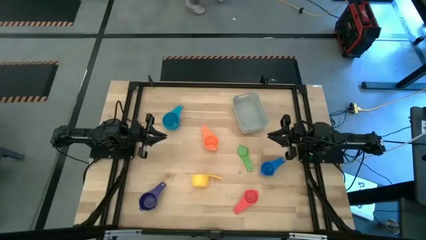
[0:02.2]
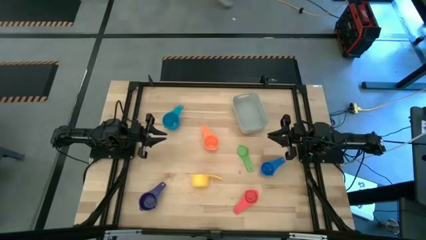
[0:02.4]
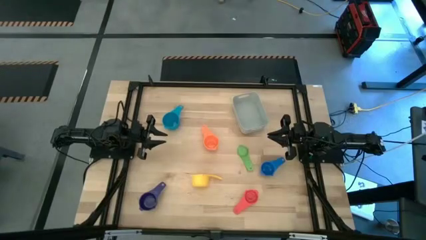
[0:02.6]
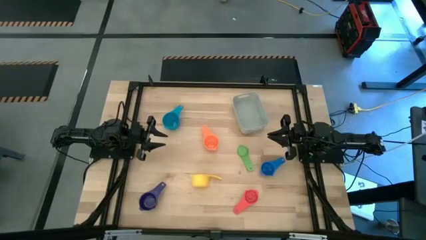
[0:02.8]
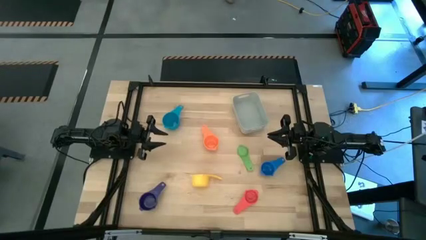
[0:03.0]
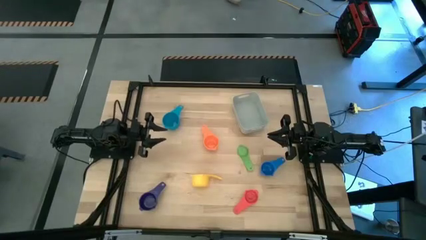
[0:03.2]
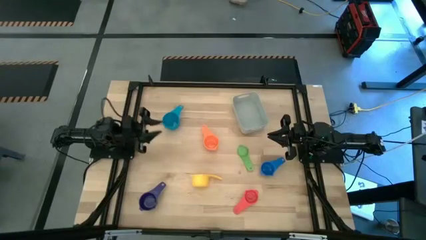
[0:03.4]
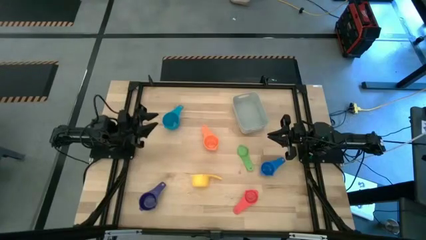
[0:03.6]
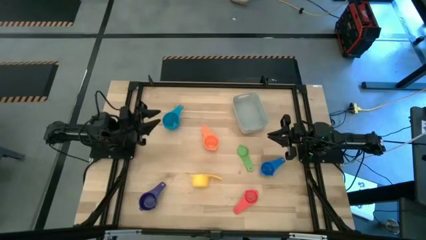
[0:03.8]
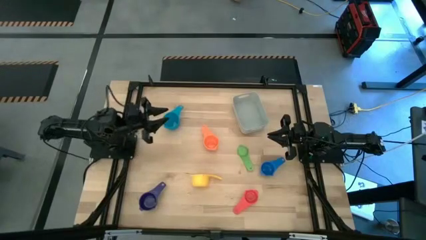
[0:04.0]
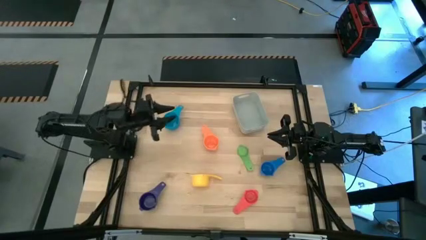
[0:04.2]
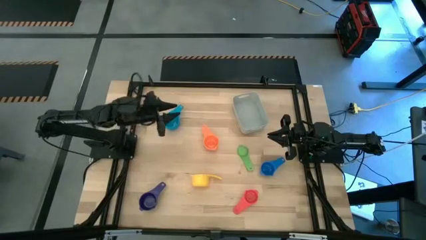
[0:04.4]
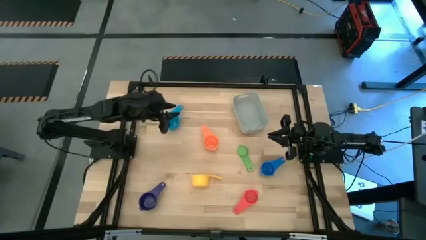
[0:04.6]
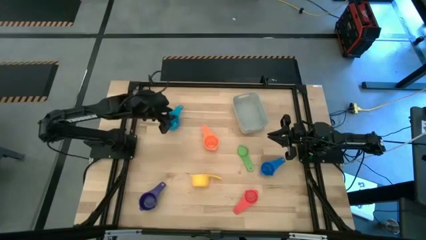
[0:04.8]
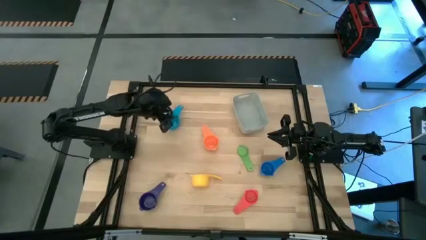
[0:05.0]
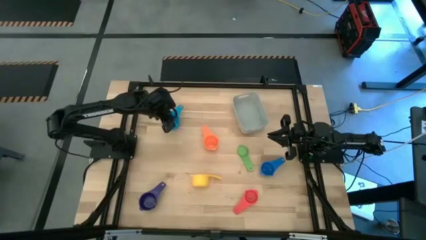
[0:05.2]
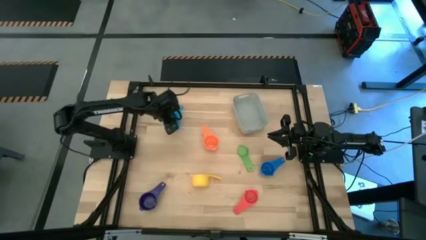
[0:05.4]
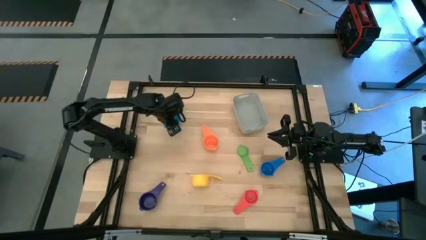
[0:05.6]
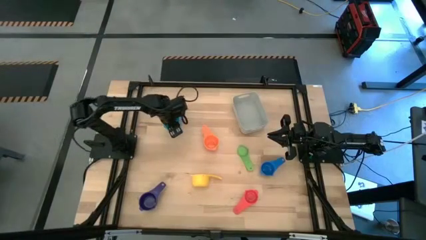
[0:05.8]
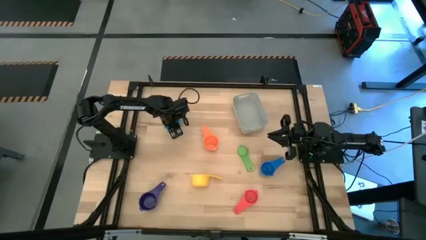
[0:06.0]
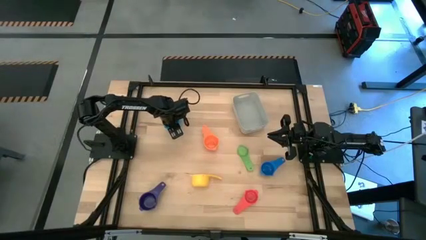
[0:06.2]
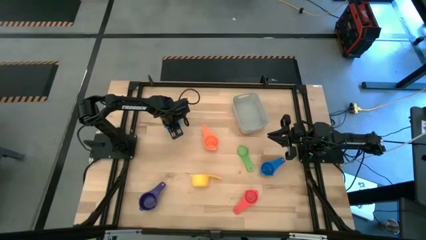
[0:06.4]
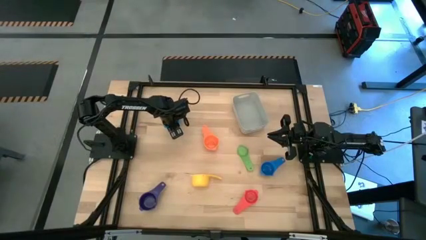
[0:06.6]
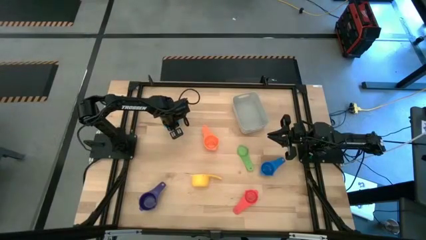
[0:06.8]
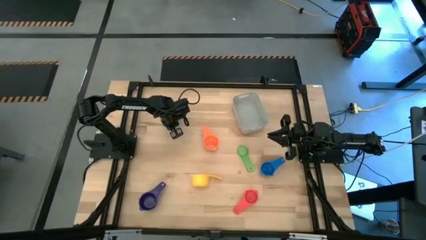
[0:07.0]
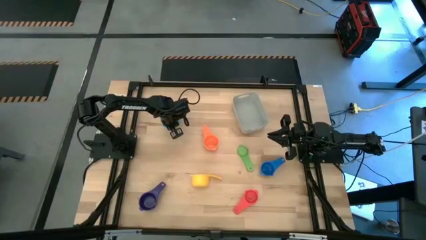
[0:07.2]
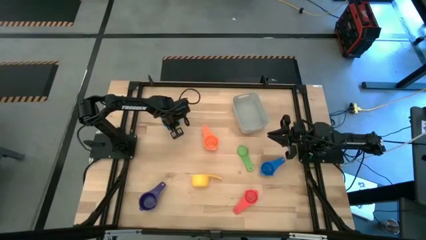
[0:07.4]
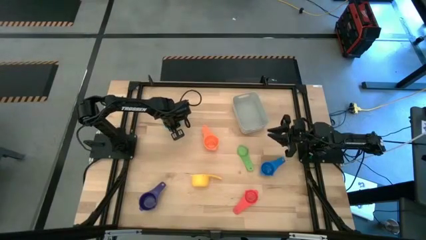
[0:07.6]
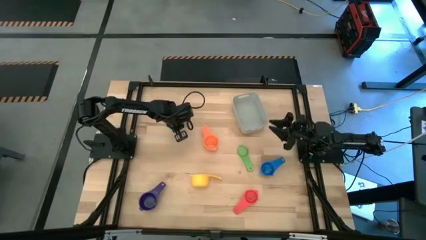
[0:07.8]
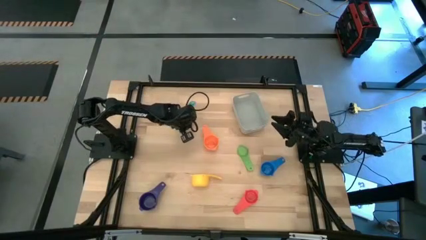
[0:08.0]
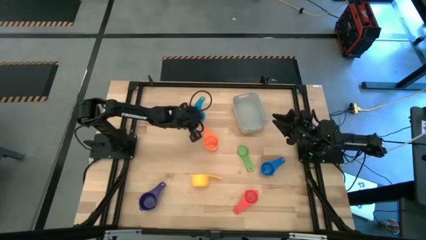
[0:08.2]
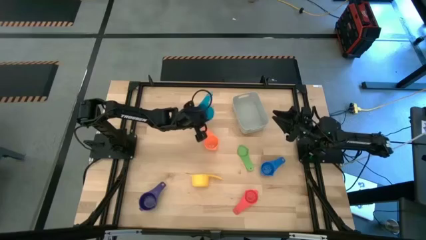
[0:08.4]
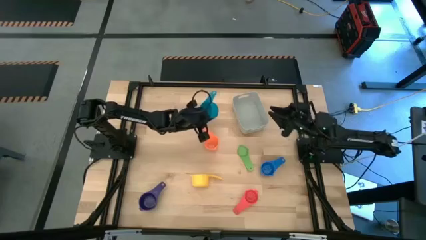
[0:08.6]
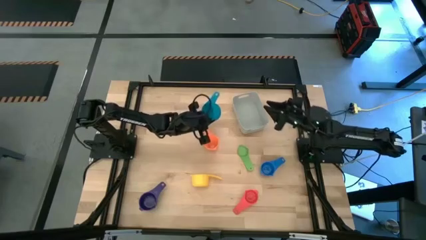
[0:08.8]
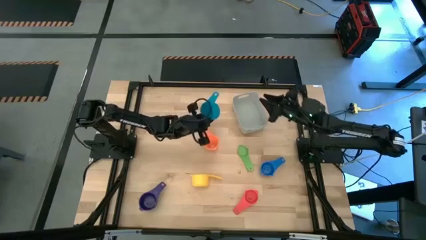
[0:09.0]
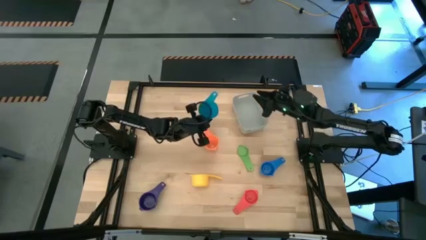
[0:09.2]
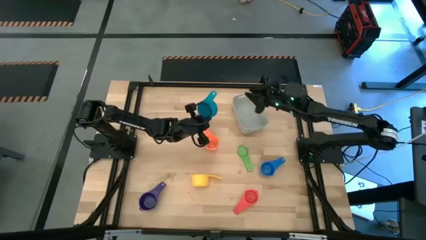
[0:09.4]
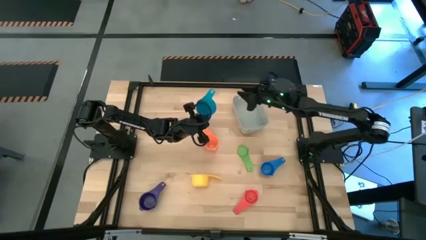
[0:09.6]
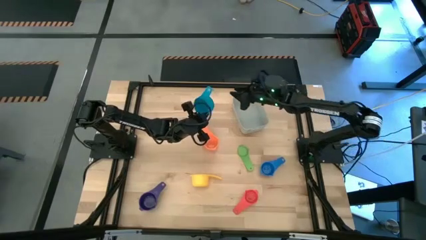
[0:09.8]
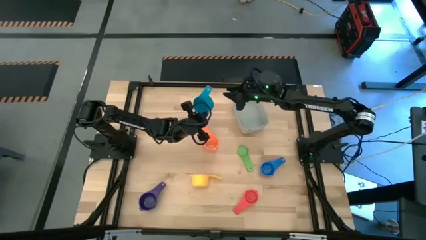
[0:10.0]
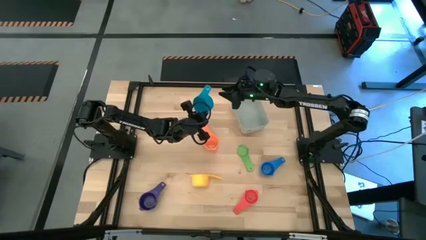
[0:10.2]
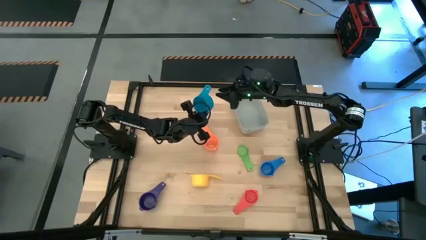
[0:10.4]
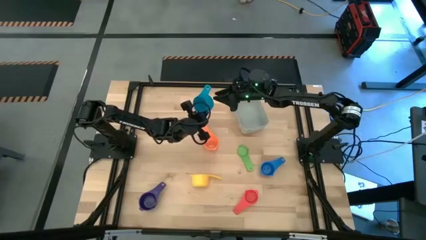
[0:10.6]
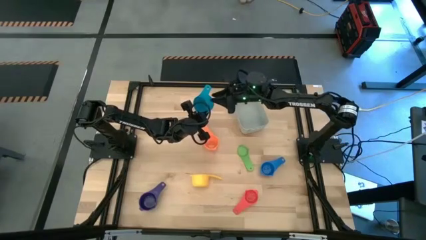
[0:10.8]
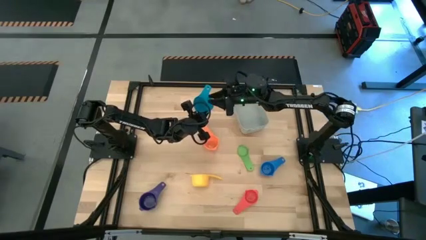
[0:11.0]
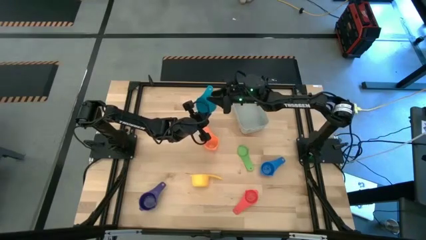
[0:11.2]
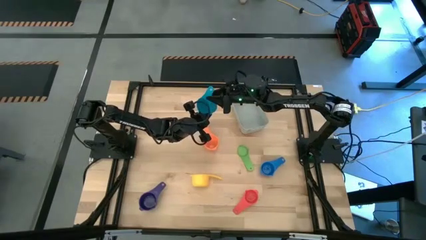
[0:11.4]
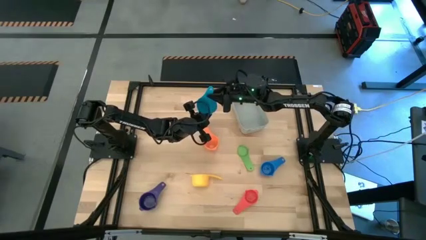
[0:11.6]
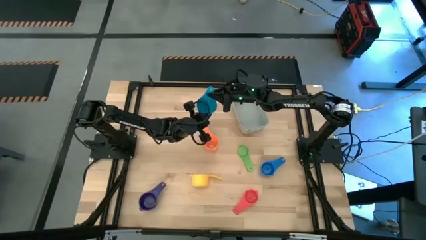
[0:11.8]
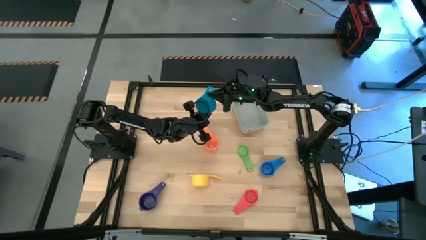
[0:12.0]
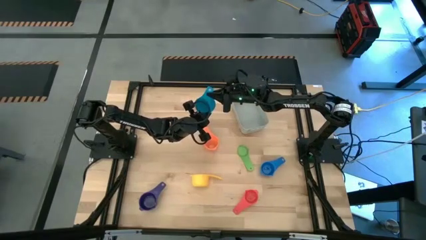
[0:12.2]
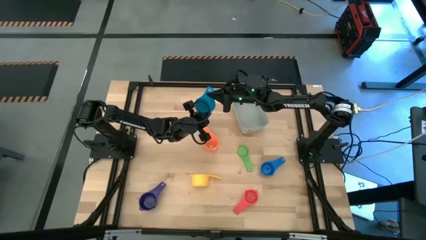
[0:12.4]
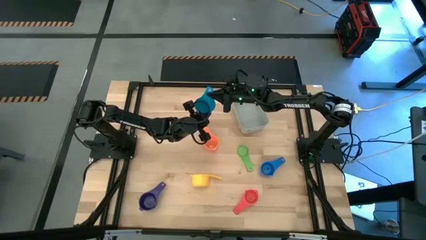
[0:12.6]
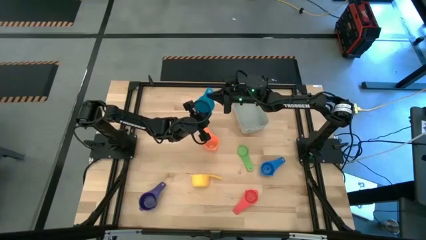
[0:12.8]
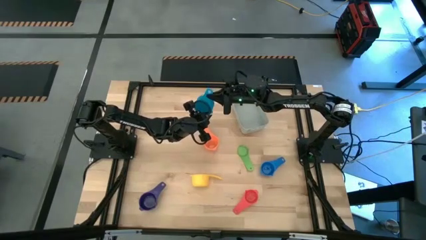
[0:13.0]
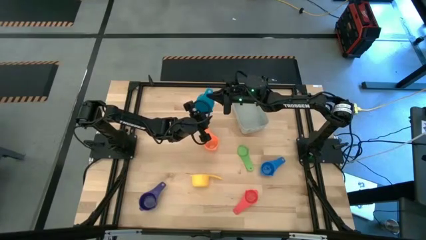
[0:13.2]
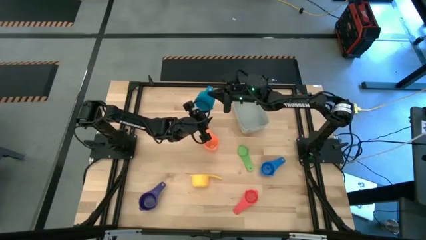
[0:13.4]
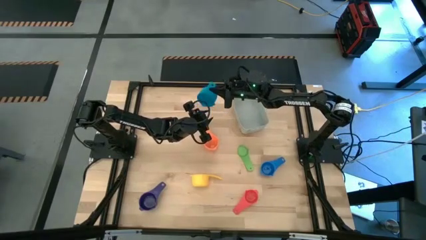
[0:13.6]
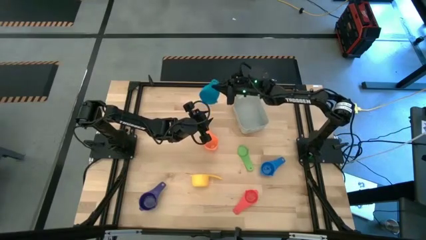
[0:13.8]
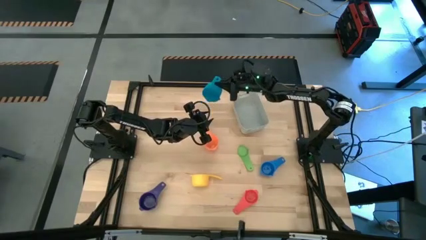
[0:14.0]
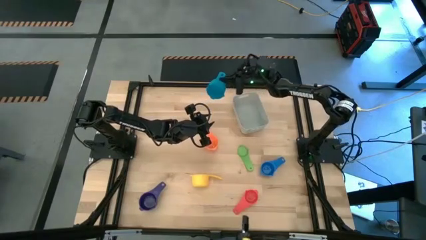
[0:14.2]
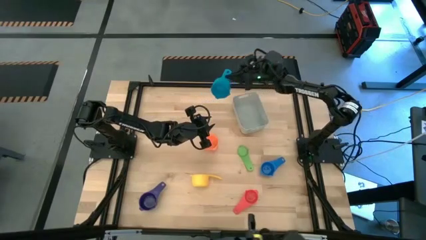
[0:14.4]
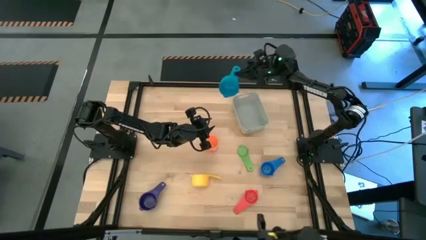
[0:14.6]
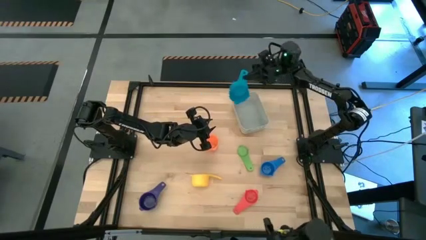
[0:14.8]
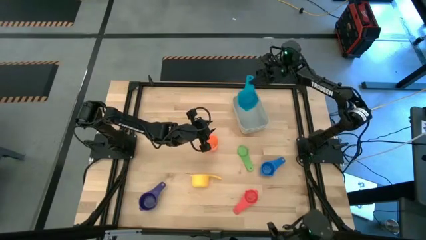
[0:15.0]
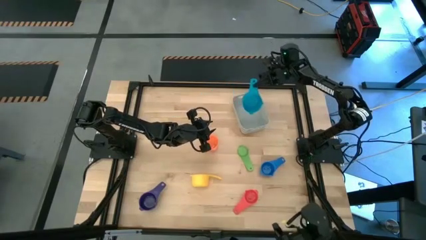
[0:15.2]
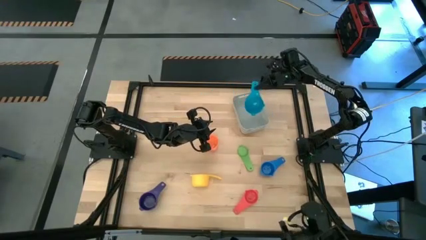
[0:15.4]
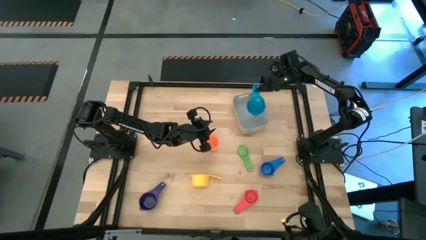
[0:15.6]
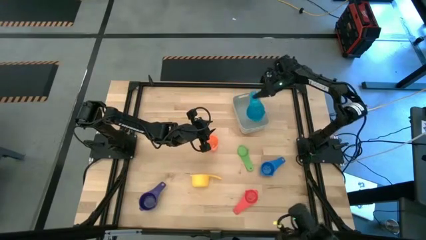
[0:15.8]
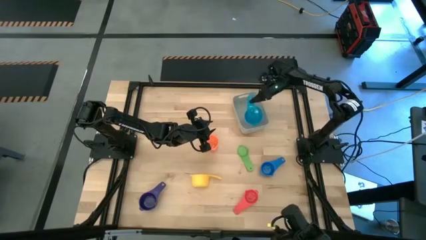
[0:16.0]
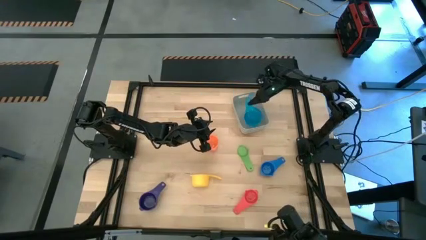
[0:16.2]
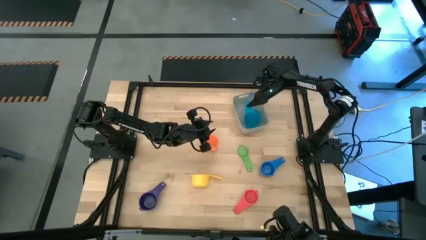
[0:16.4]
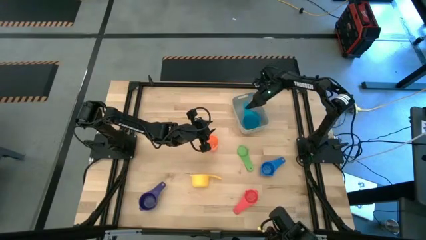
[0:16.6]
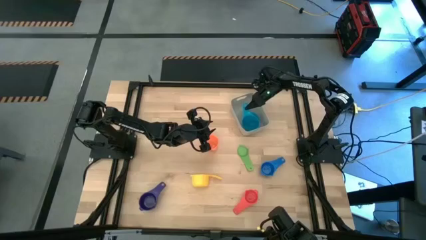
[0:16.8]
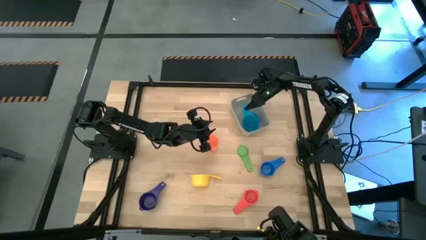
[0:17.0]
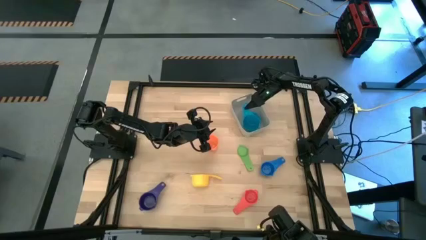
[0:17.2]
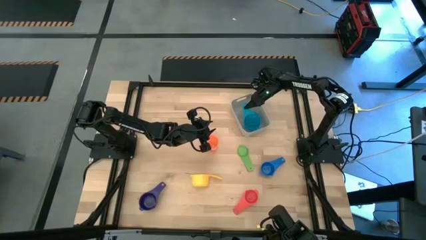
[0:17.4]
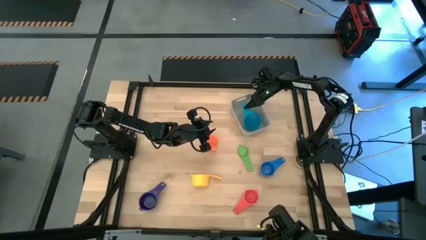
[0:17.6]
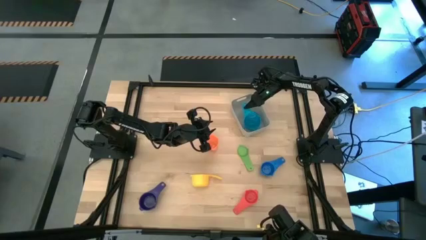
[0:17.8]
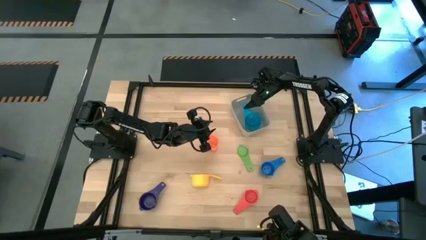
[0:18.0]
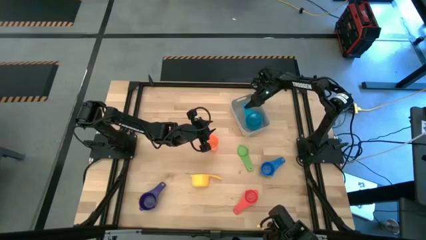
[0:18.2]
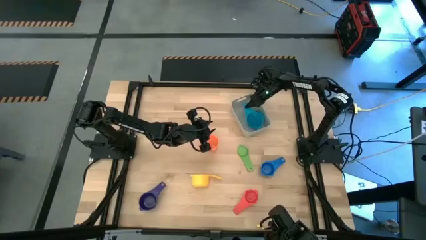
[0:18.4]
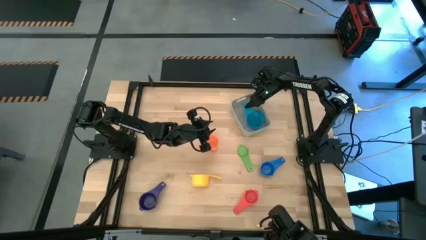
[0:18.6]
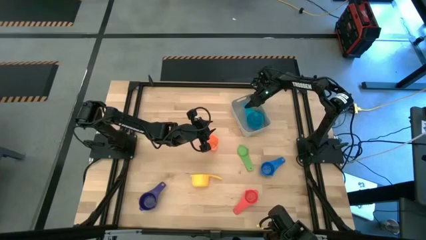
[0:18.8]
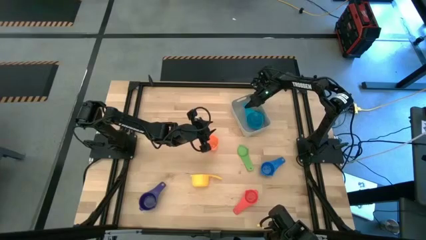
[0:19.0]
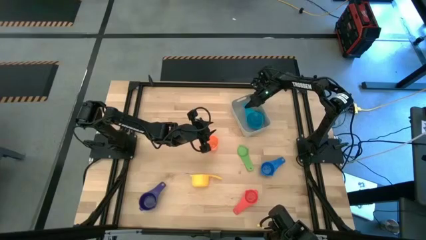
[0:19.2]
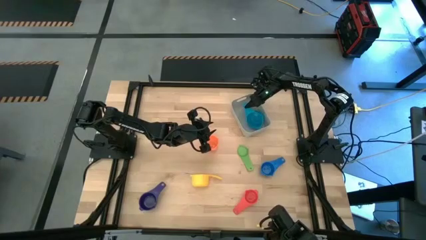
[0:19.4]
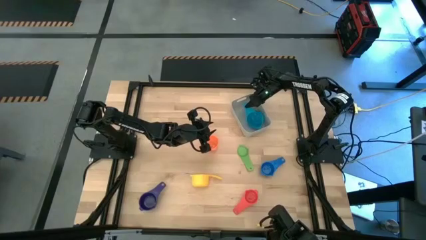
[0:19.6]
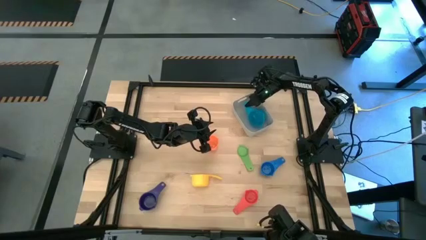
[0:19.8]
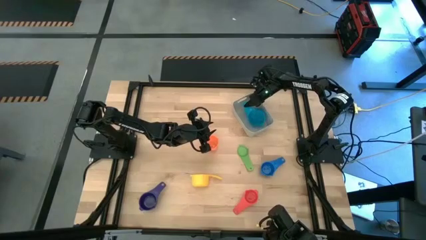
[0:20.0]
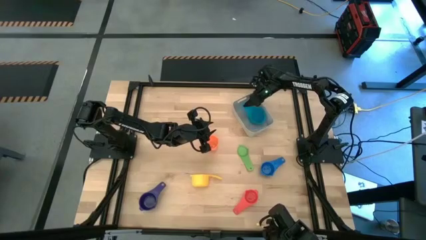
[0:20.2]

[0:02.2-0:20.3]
Task: Nest measuring cups in basket
Put the light blue measuring cup into the gray bin
